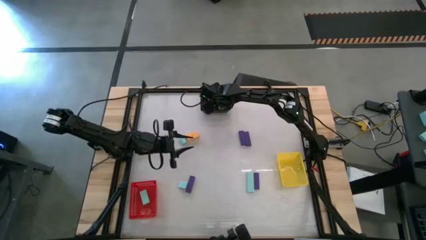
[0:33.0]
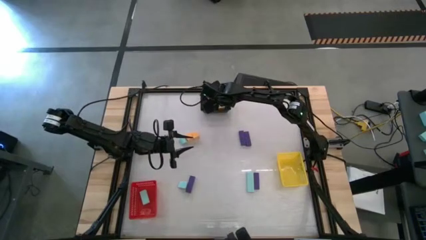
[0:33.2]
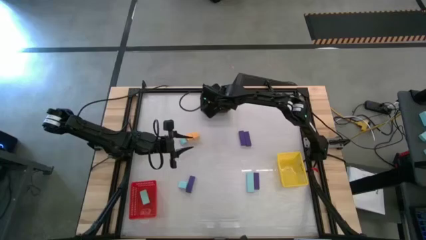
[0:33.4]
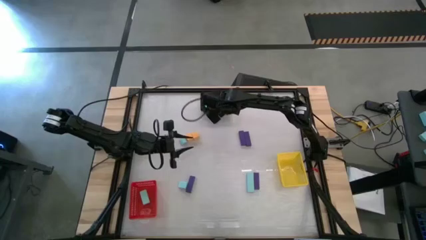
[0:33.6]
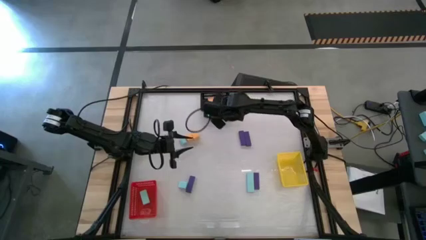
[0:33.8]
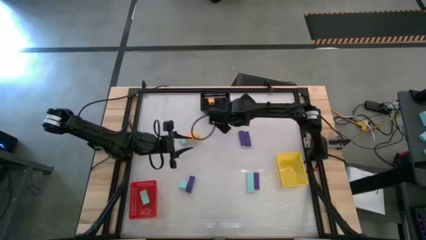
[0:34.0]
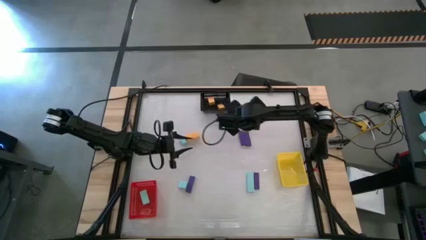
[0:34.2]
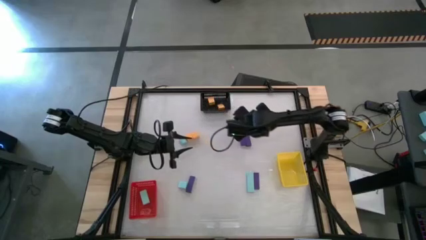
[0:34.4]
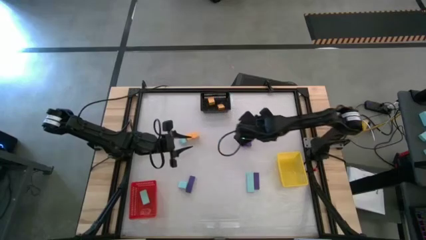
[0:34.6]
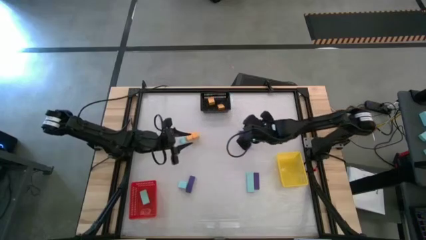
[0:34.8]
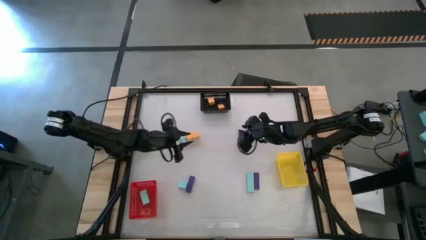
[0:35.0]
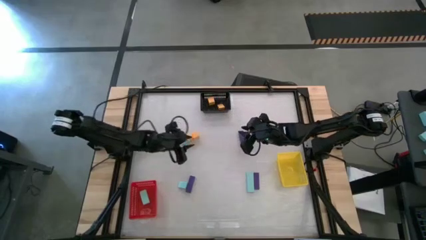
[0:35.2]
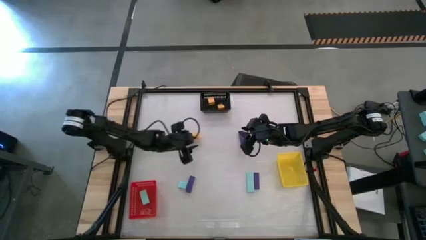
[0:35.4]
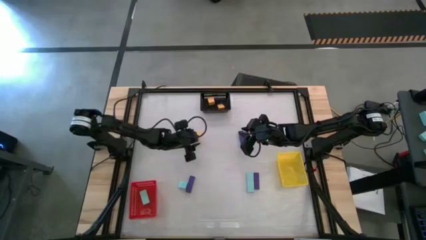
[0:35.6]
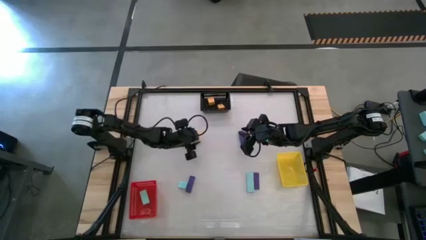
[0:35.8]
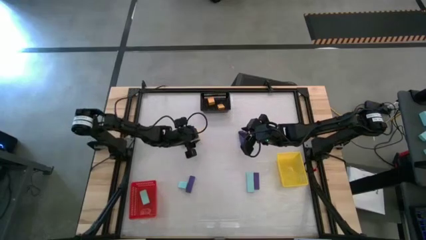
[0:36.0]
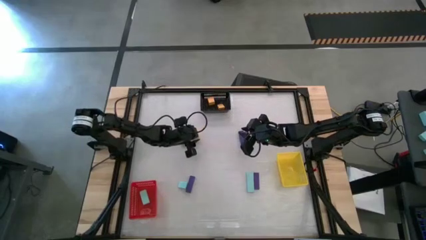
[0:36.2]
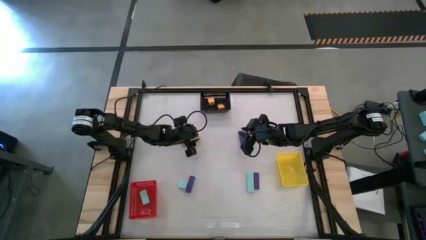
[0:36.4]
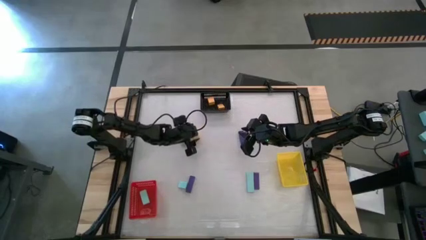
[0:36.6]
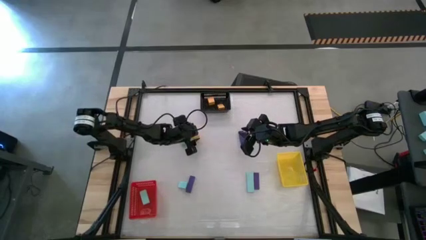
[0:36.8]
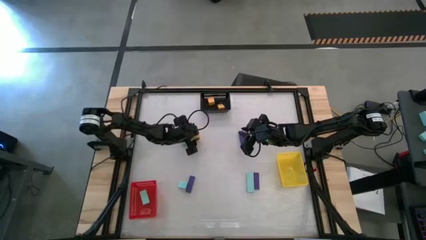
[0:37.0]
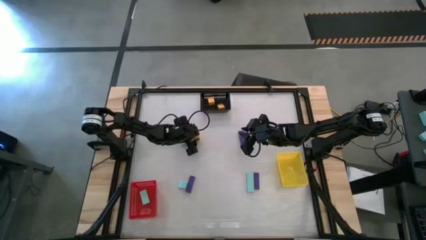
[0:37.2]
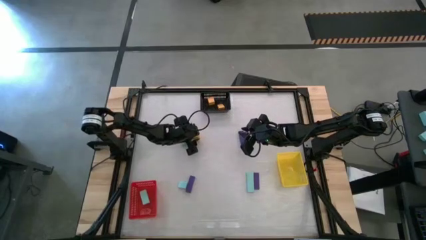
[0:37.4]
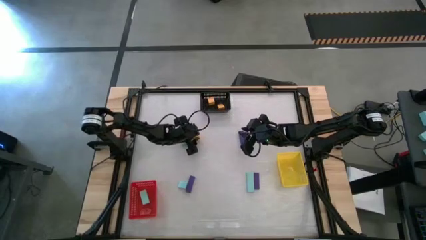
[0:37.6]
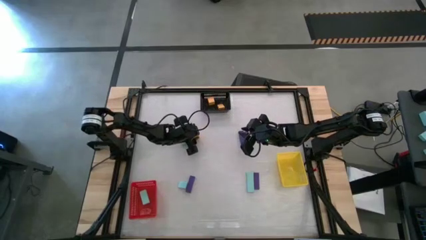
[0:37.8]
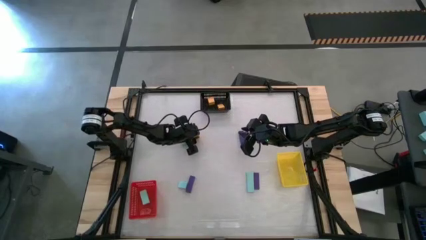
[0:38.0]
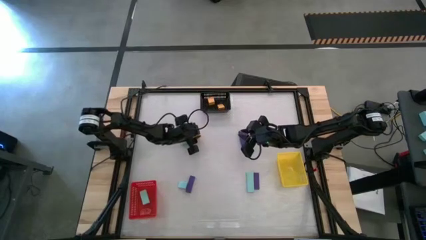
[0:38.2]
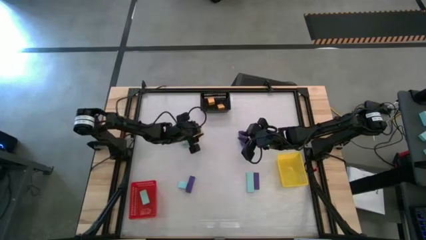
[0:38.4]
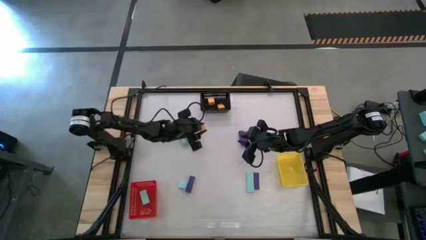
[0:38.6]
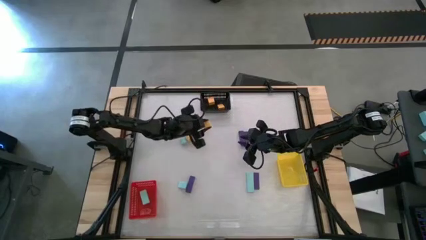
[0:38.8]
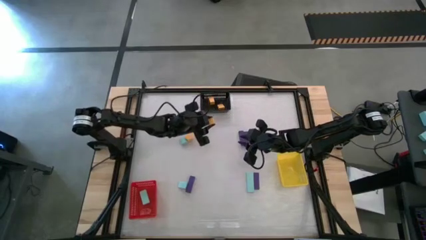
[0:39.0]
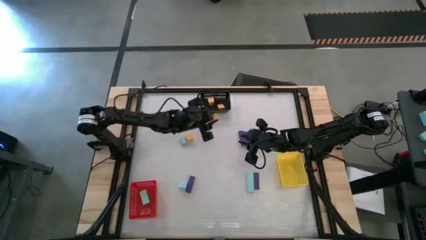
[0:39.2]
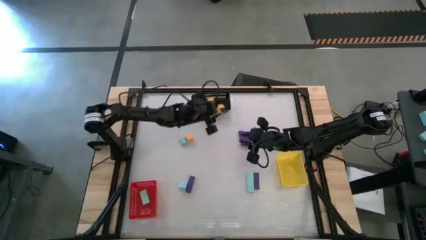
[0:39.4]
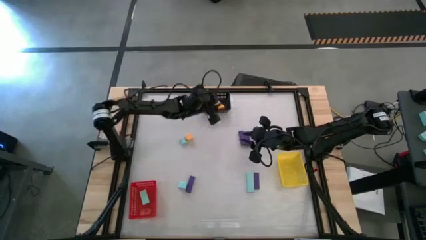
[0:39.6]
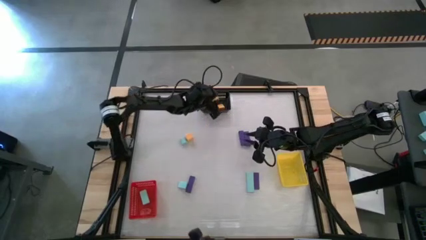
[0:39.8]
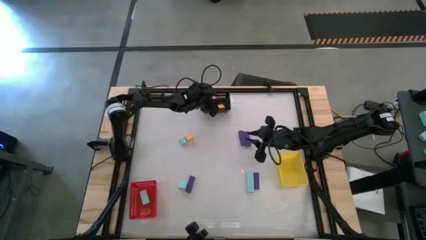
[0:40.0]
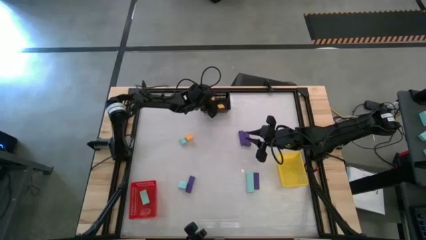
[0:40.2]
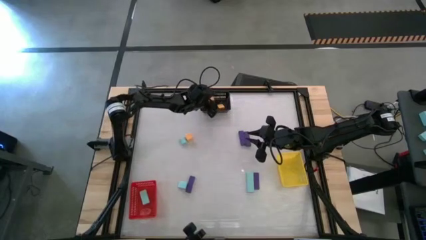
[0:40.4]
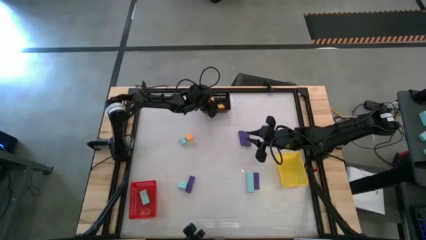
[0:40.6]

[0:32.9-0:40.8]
Task: Sort & place blocks by color
Put the yellow block into the black bin
